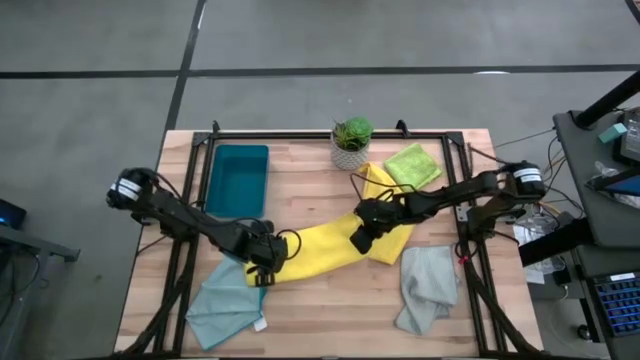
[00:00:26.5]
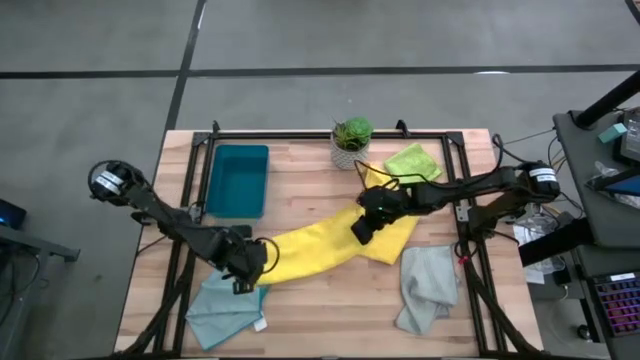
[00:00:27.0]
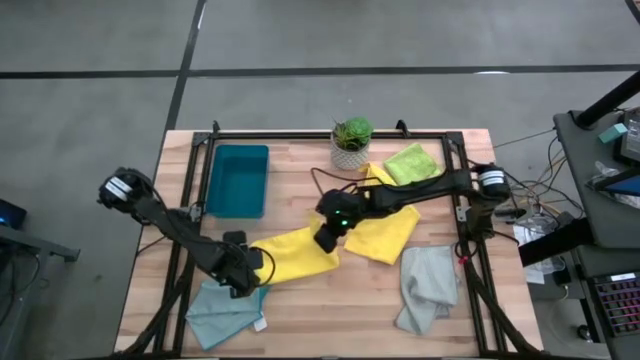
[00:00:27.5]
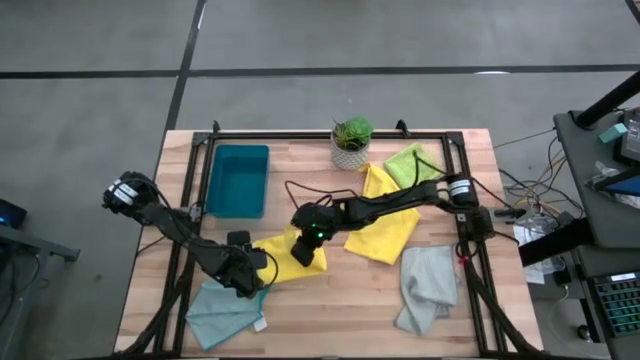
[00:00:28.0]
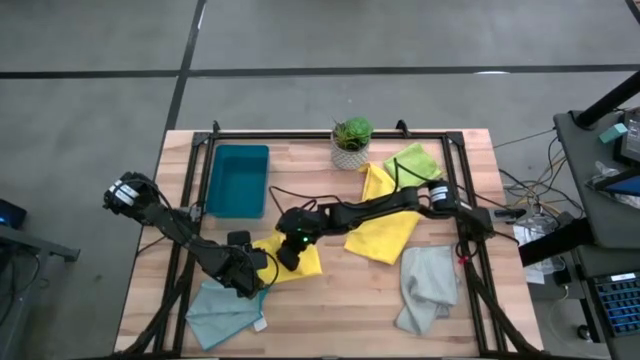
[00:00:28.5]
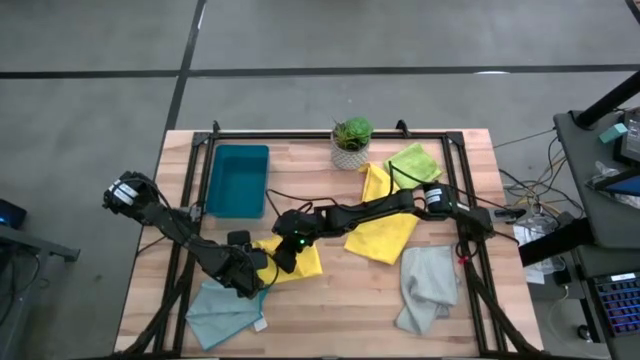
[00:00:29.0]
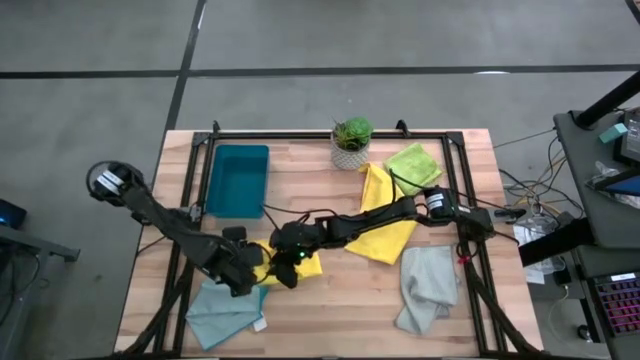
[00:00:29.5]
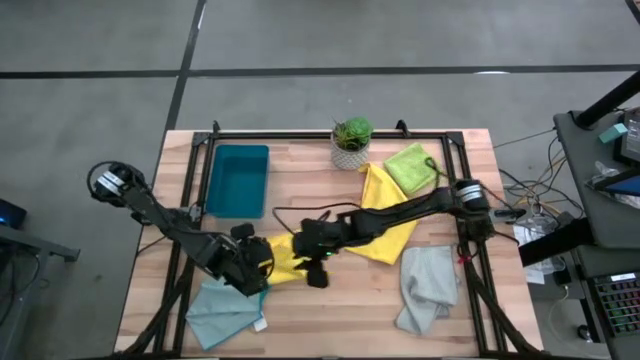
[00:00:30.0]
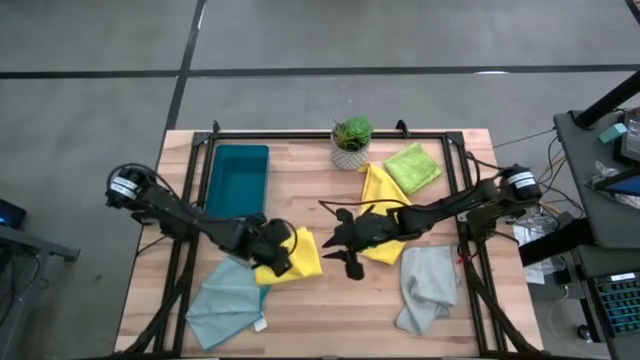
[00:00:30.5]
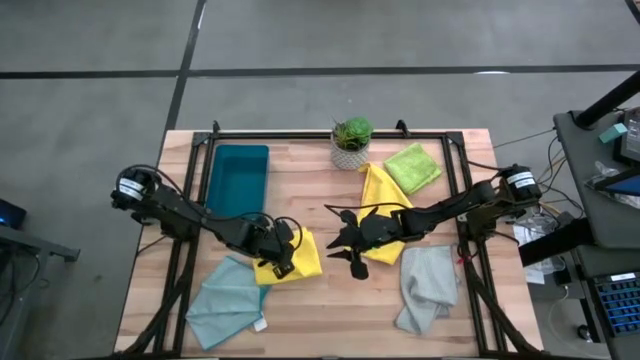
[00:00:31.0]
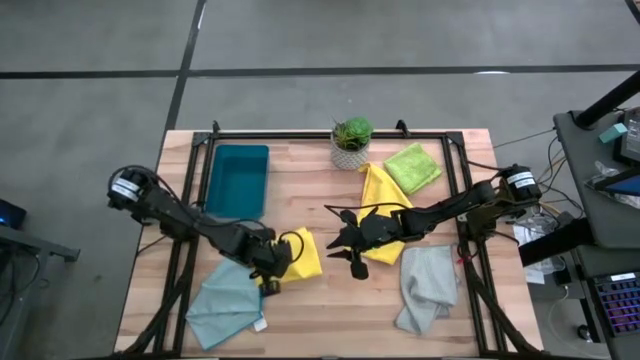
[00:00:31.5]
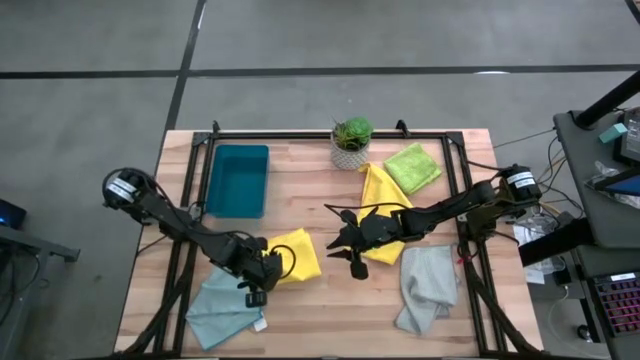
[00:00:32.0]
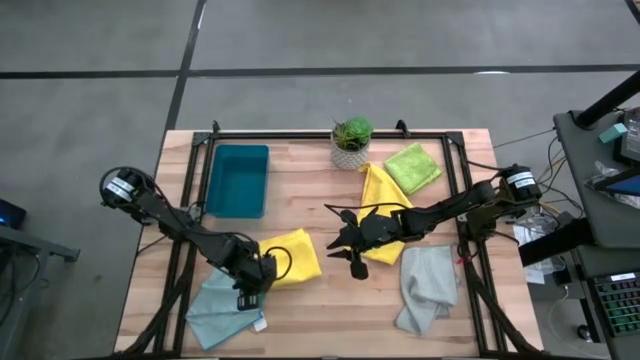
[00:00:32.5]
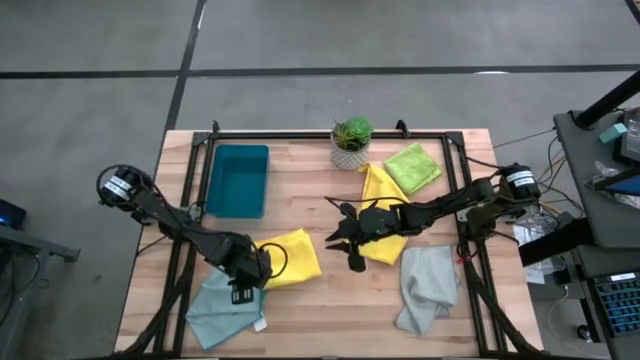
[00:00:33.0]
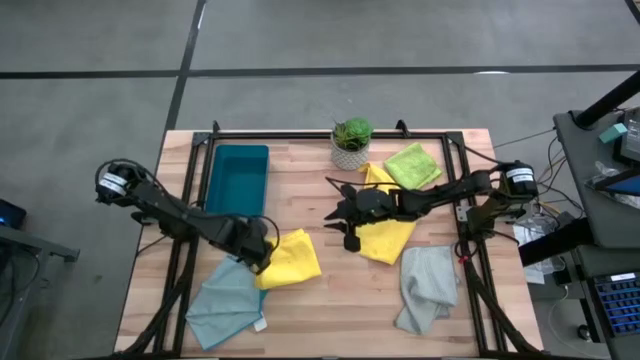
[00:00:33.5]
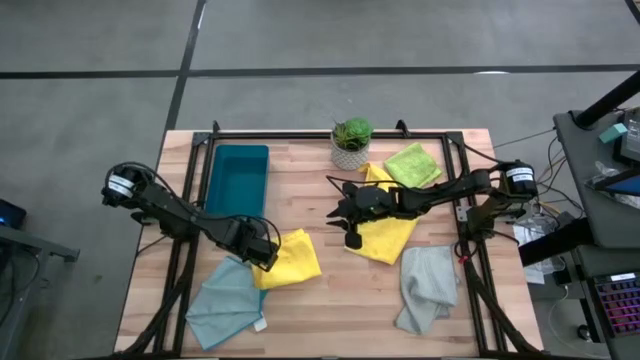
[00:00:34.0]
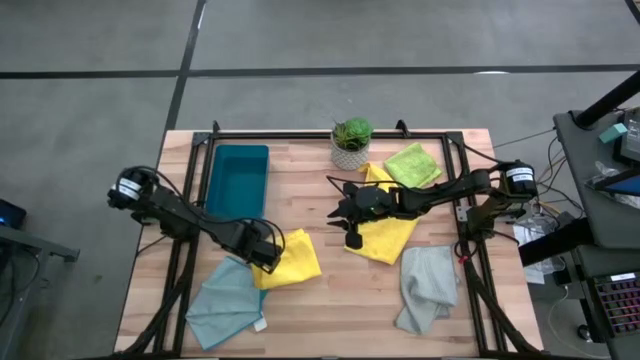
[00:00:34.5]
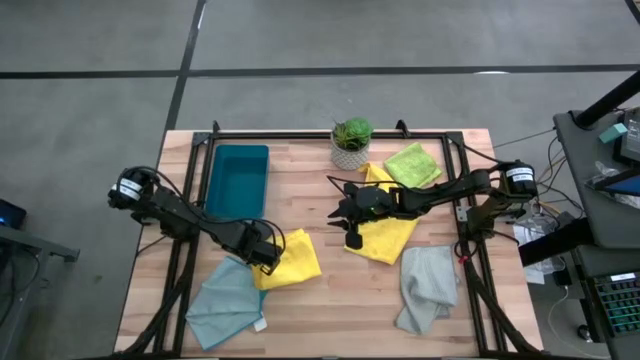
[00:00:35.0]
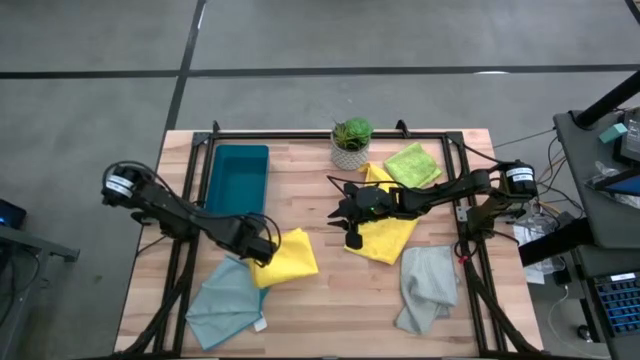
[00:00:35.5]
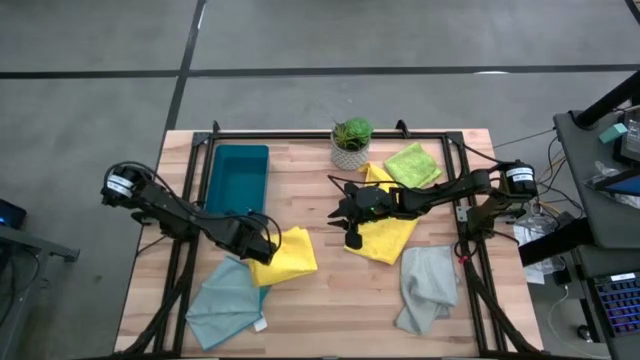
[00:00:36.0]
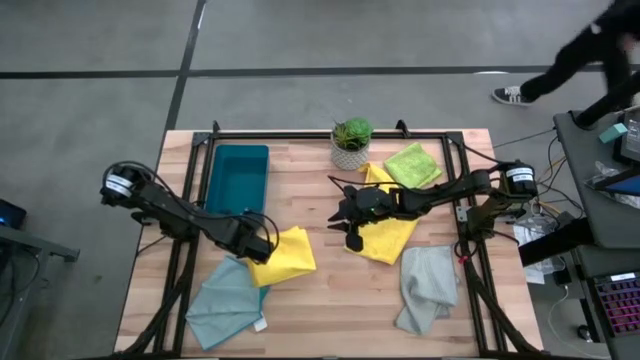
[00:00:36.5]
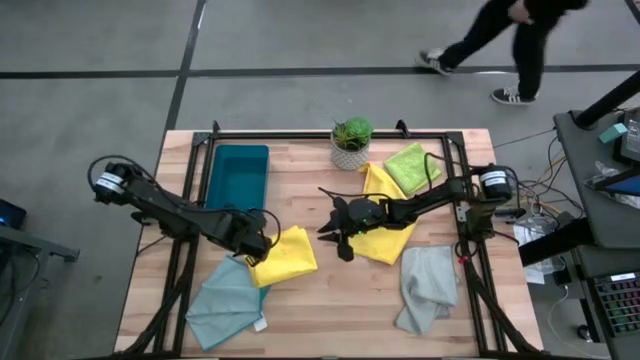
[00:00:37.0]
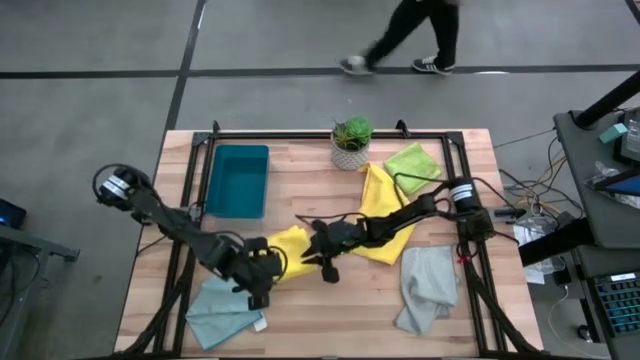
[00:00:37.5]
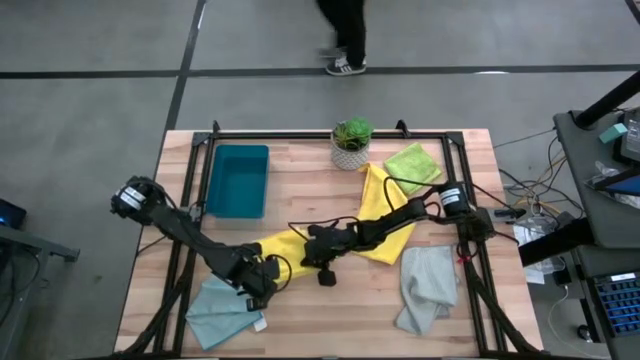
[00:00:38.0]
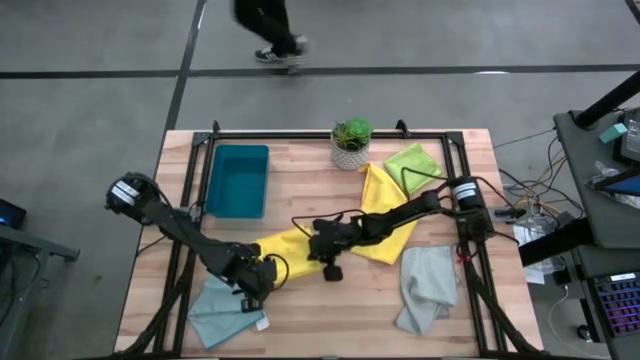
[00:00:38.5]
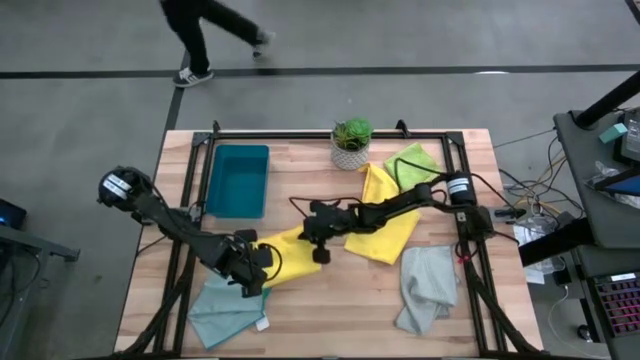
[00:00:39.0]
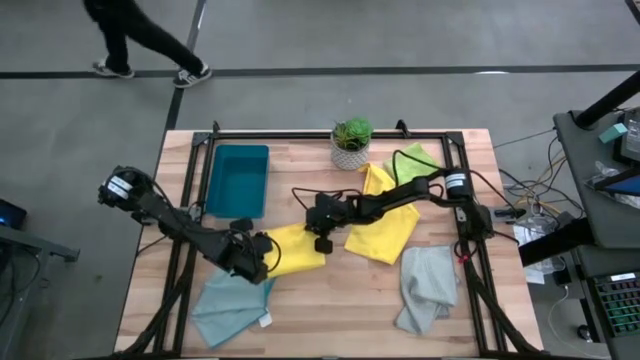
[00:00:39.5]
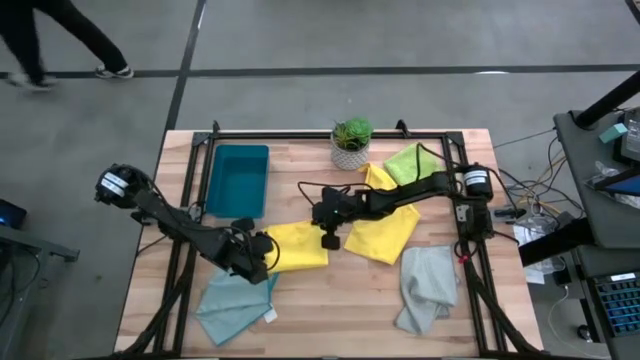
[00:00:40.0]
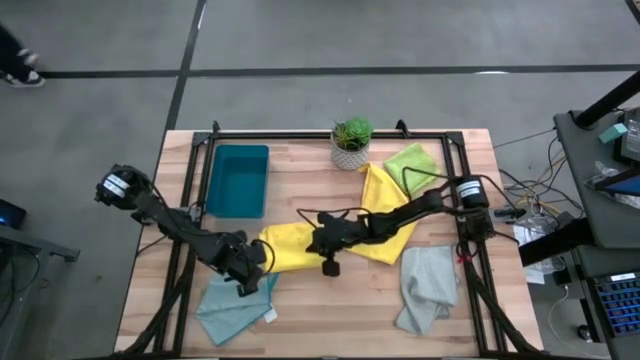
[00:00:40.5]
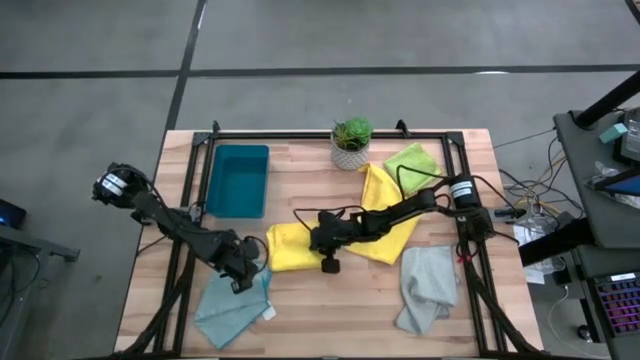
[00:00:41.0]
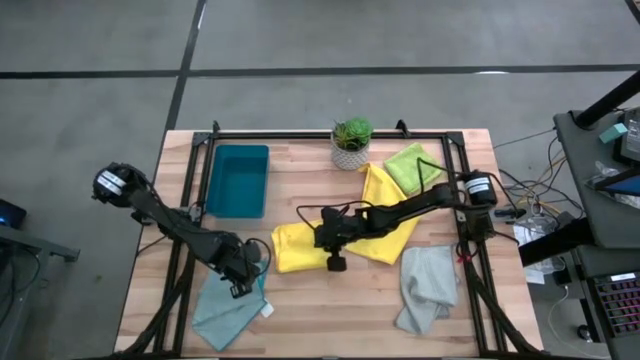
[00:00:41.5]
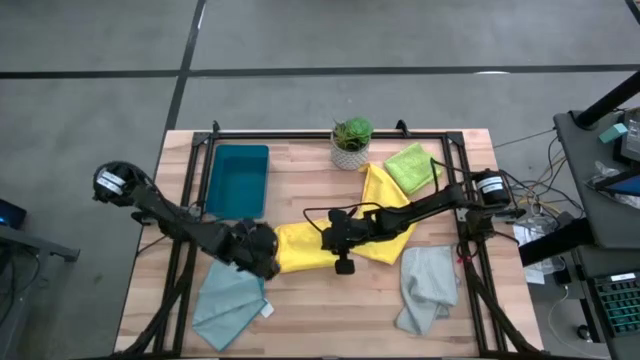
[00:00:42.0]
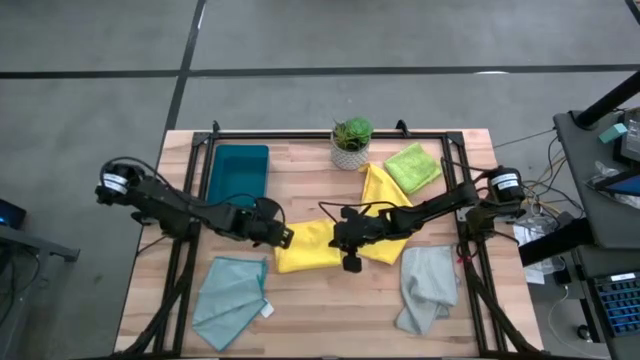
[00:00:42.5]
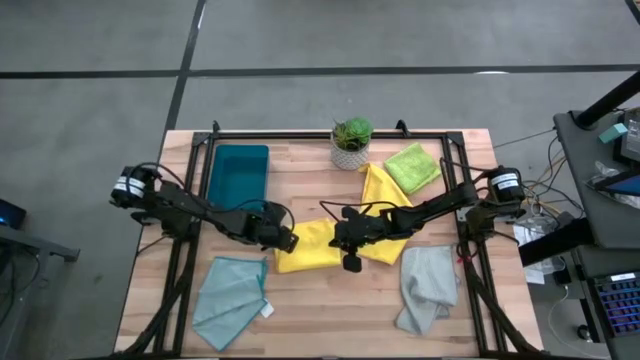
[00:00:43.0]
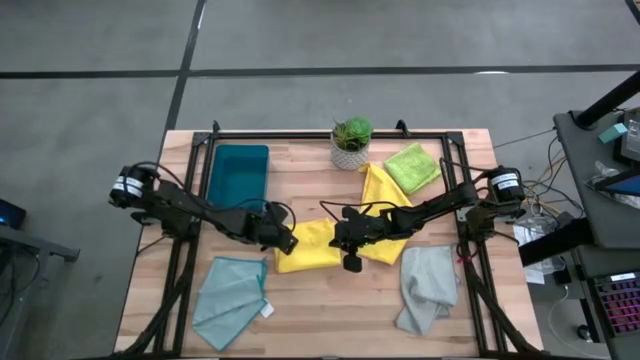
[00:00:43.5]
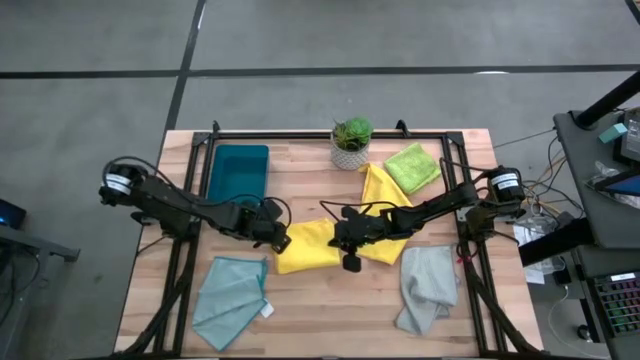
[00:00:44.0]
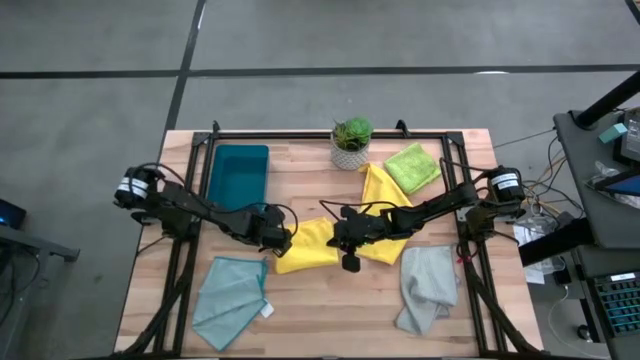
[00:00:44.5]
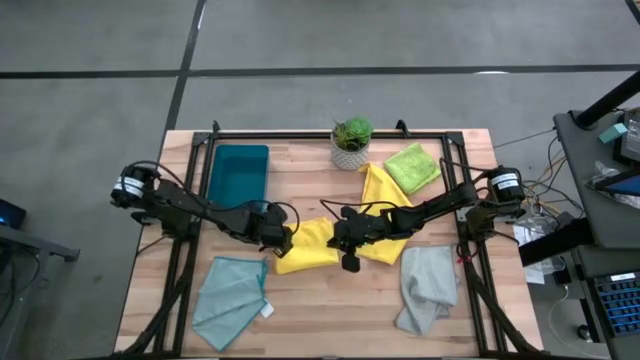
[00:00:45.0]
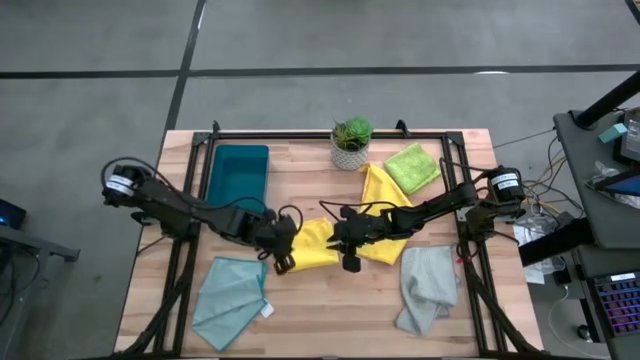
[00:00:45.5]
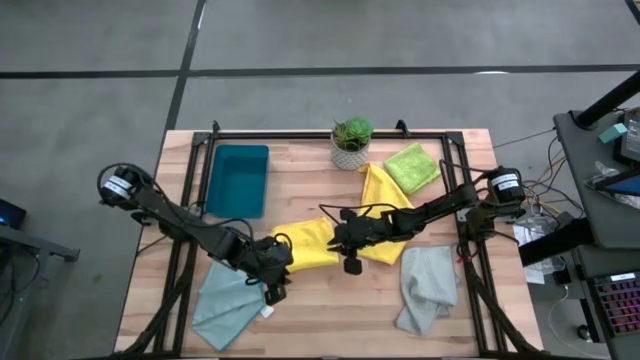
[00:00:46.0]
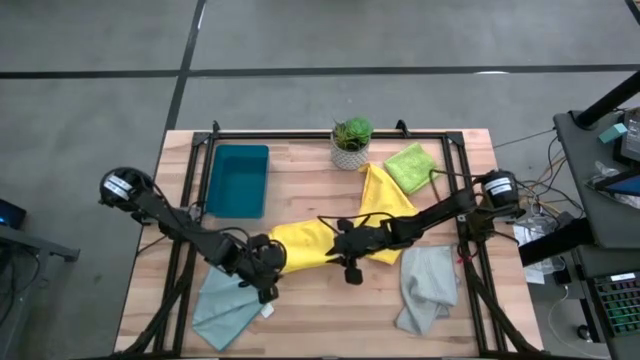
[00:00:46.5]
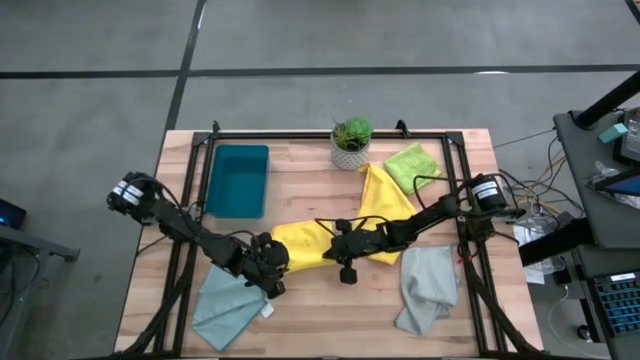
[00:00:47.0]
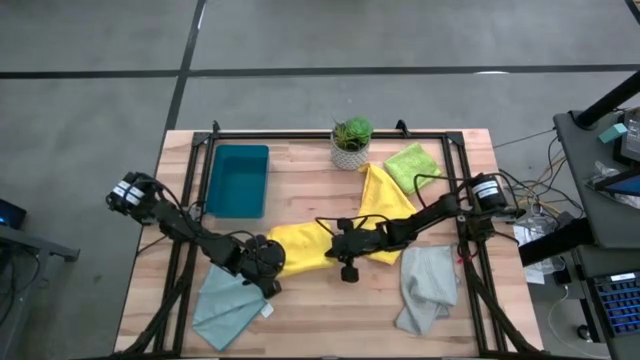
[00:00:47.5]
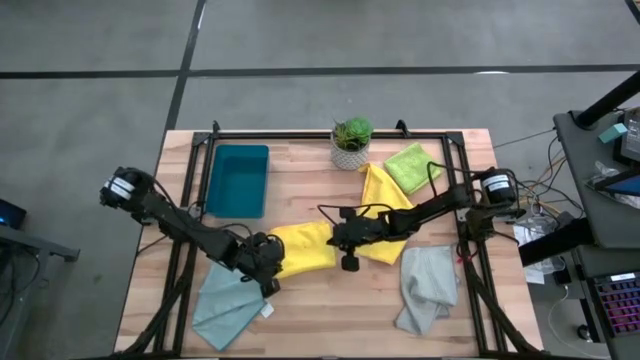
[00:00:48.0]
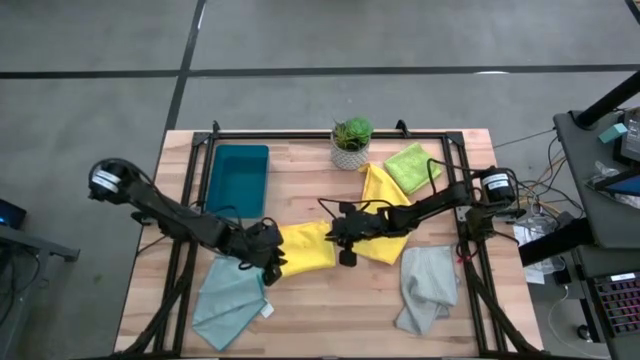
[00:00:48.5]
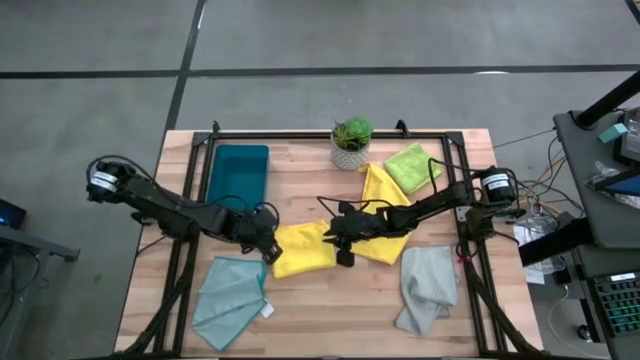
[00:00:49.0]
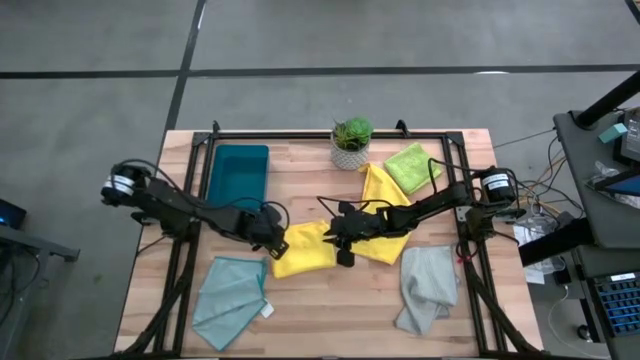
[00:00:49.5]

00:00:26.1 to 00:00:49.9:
Task: Fold microfiber towels
Fold the left yellow towel
